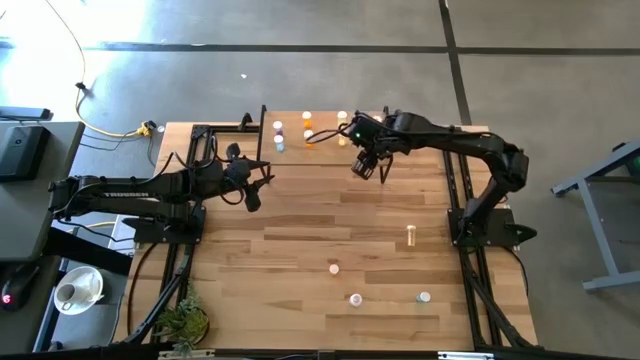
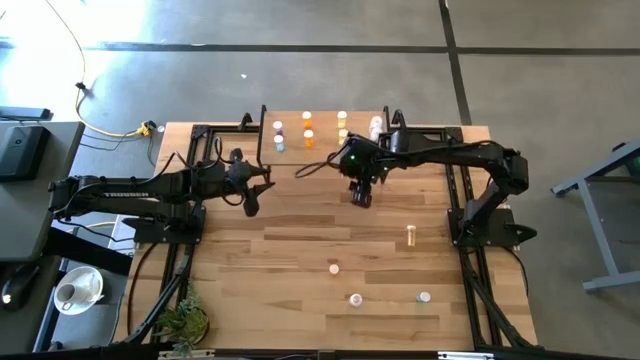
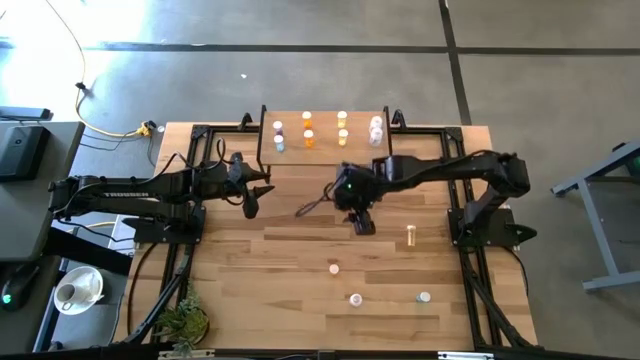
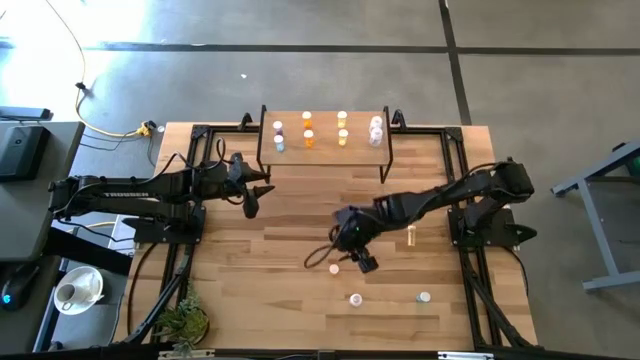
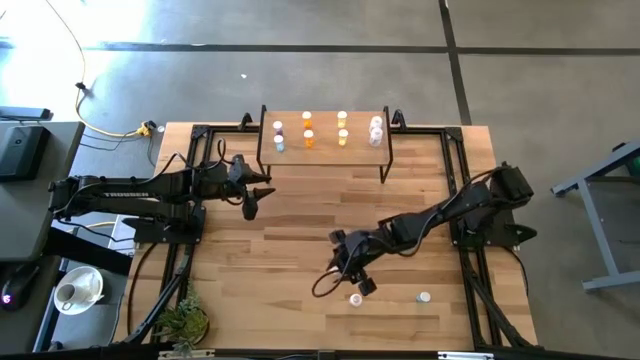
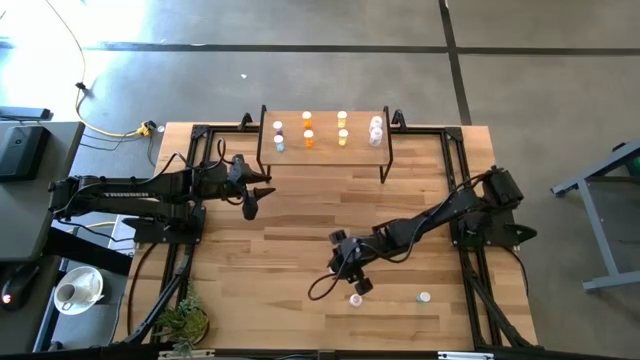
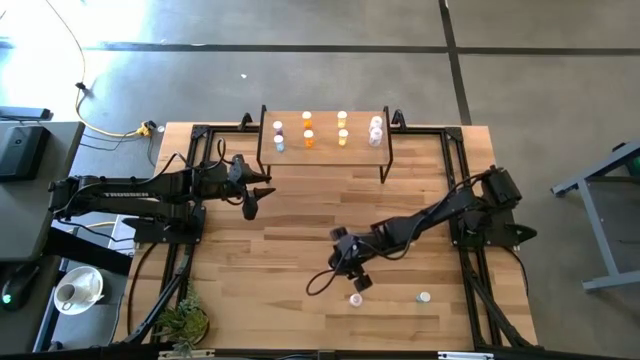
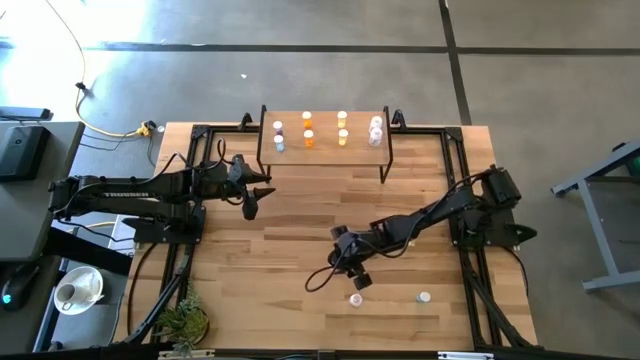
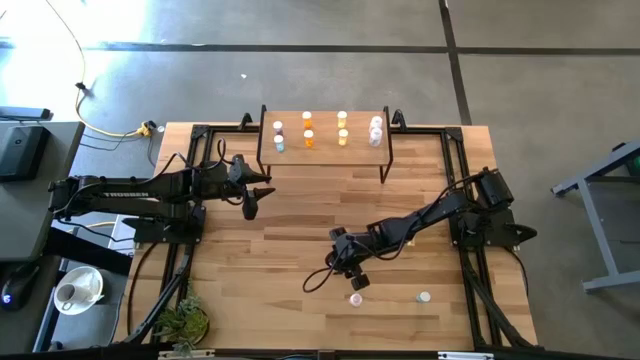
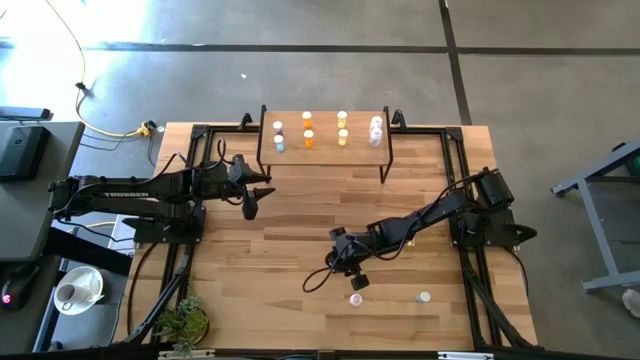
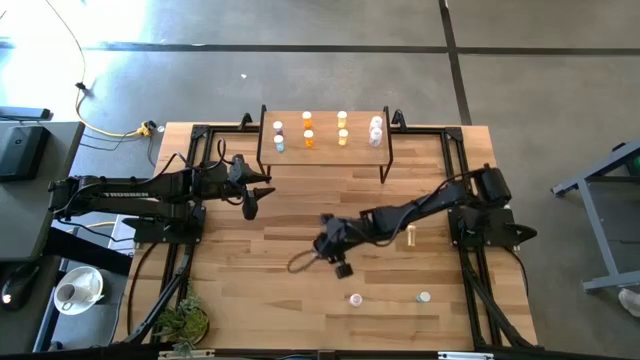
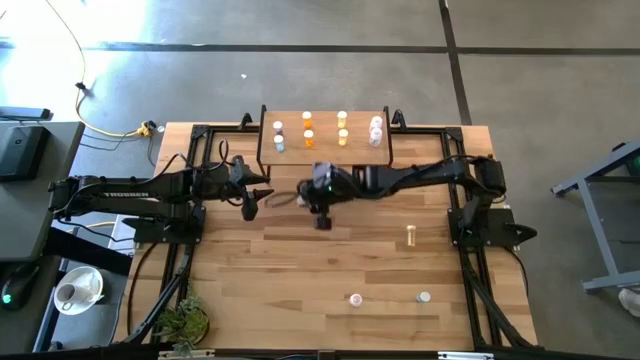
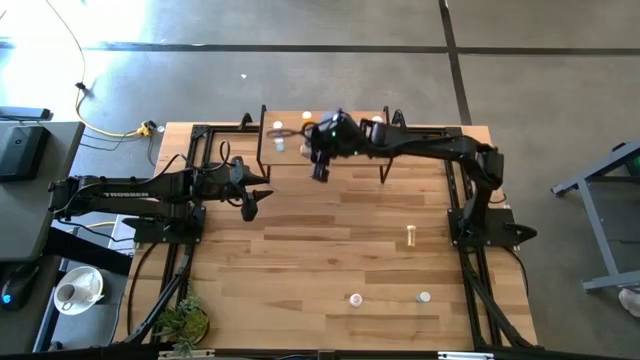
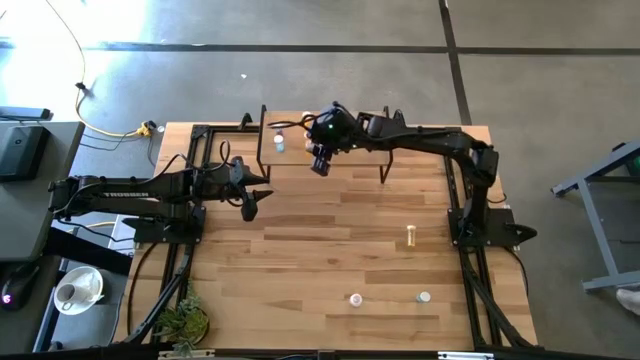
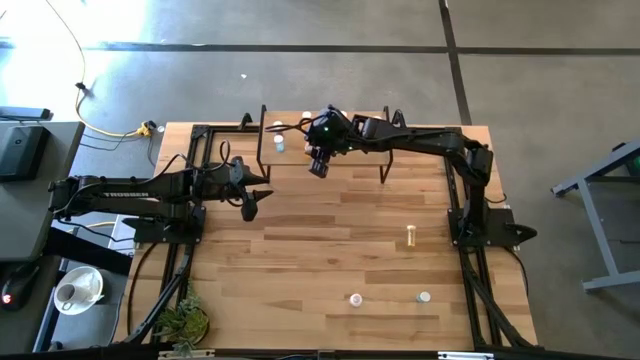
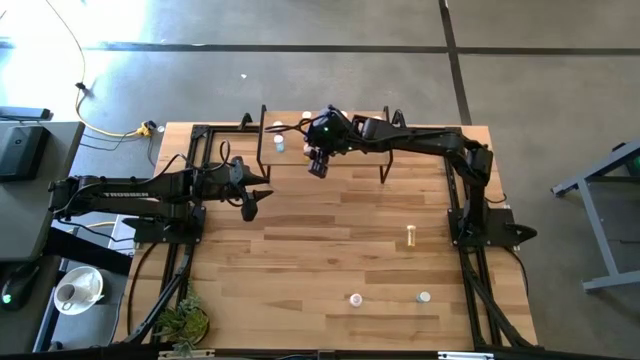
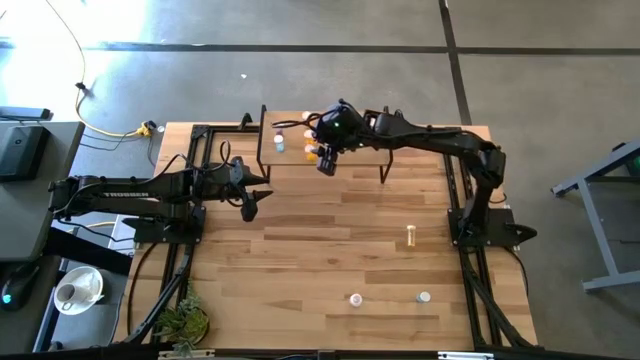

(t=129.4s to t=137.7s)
Task: Pick and place medicine bottles onto shelf by color
Put the orange pill bottle on the shelf aligned with the other orange pill bottle

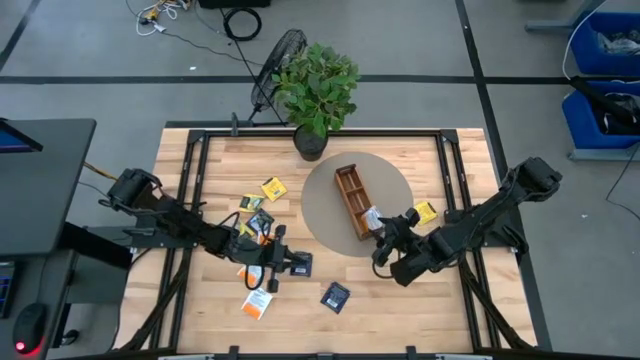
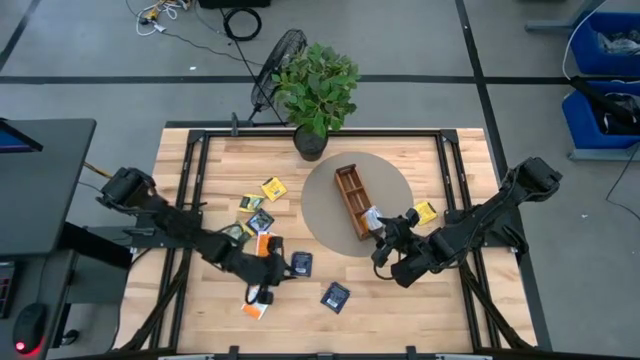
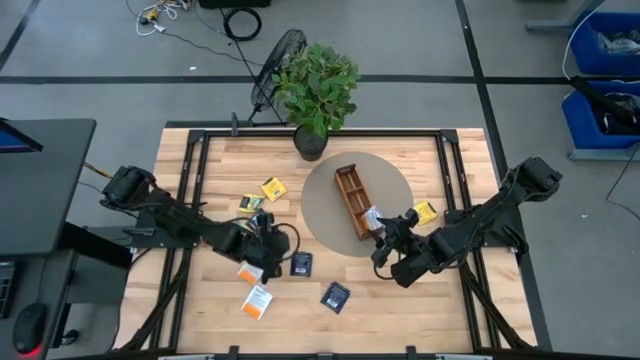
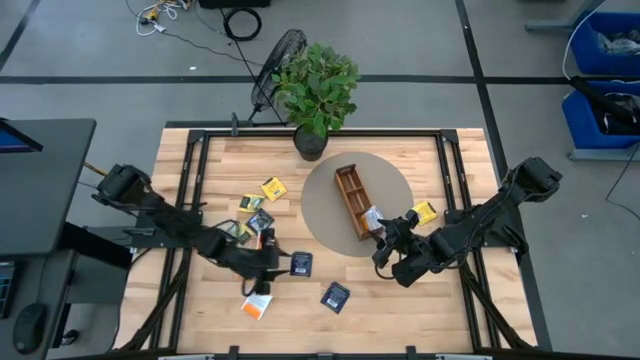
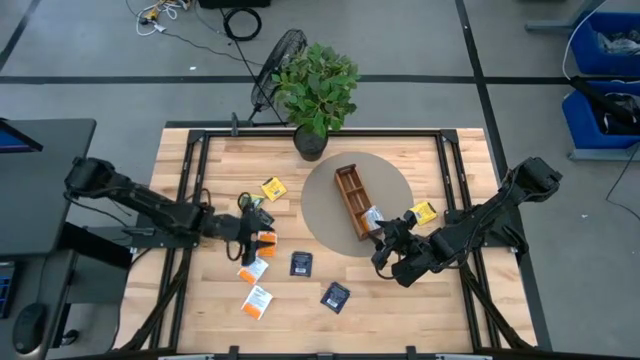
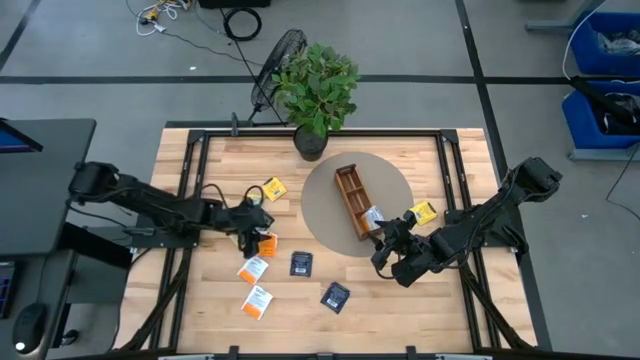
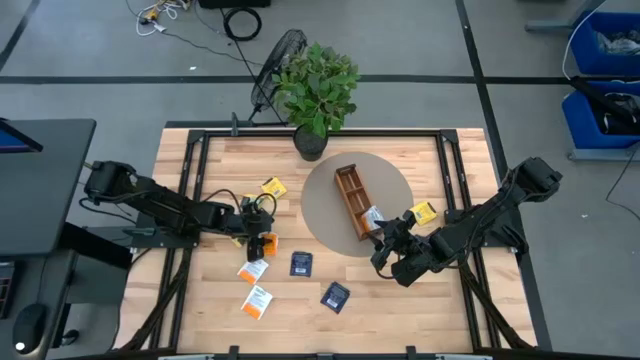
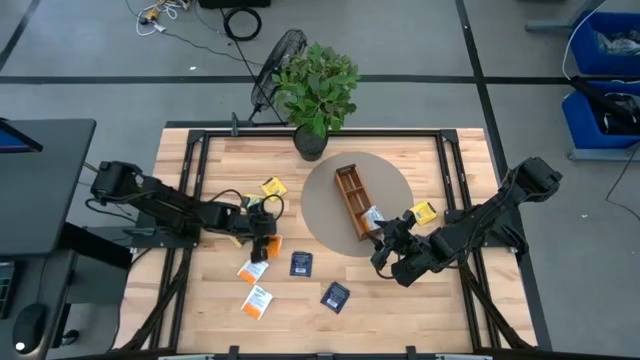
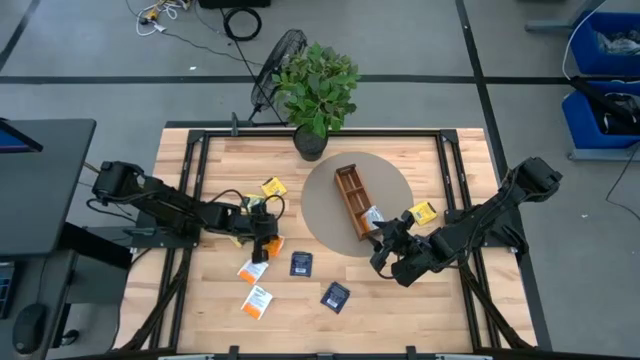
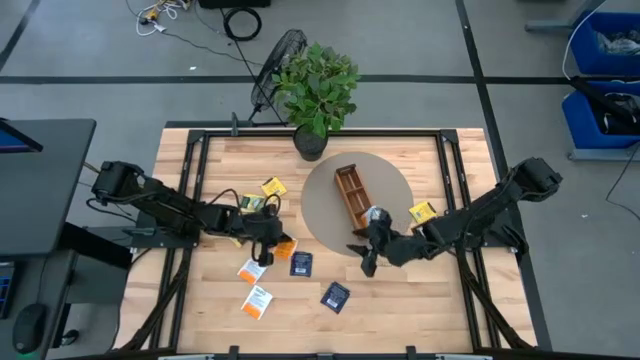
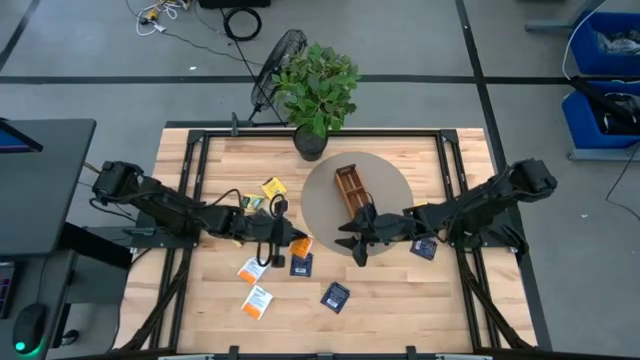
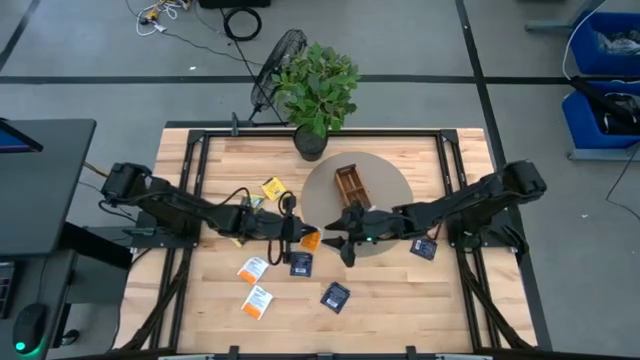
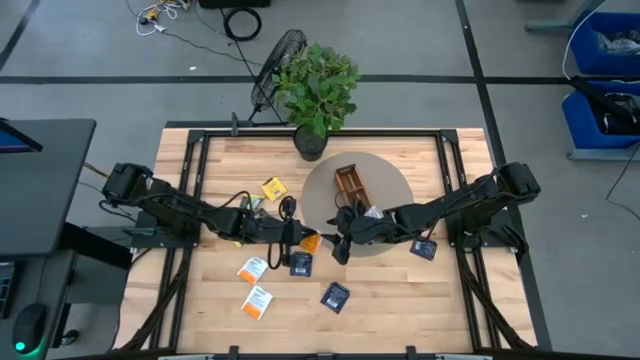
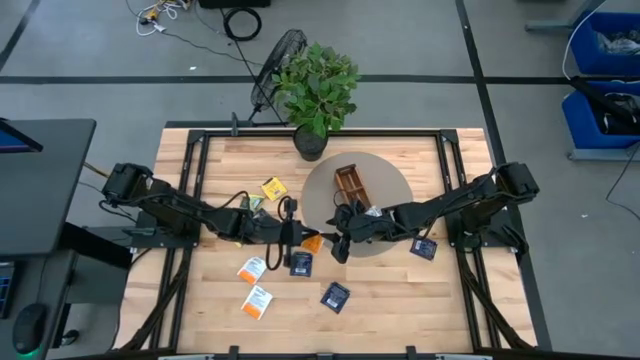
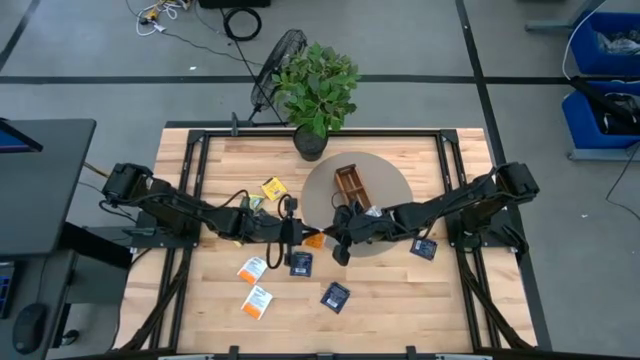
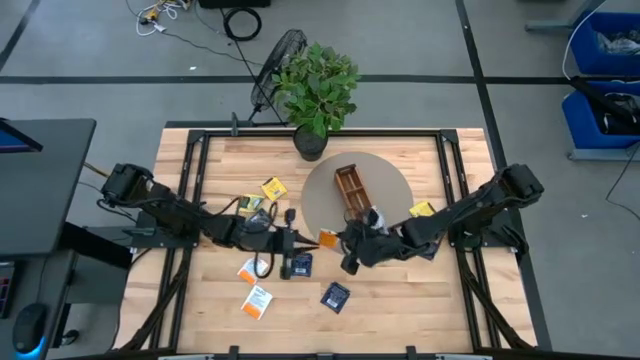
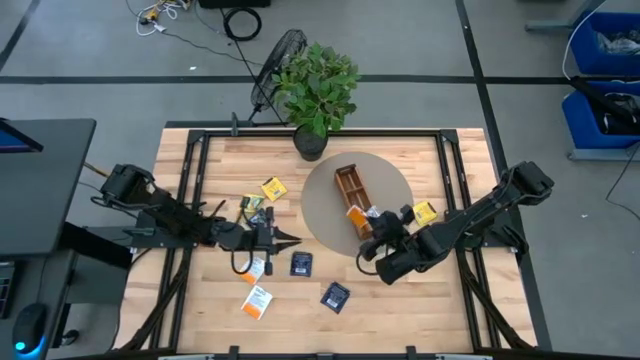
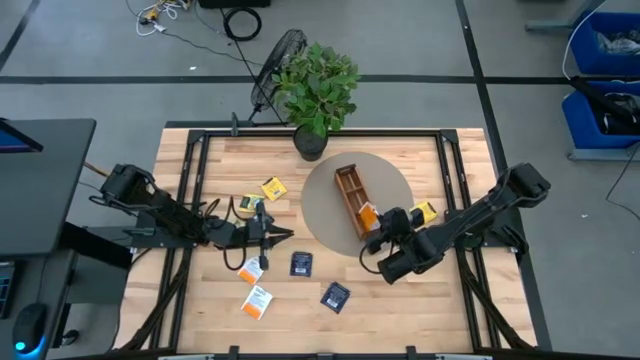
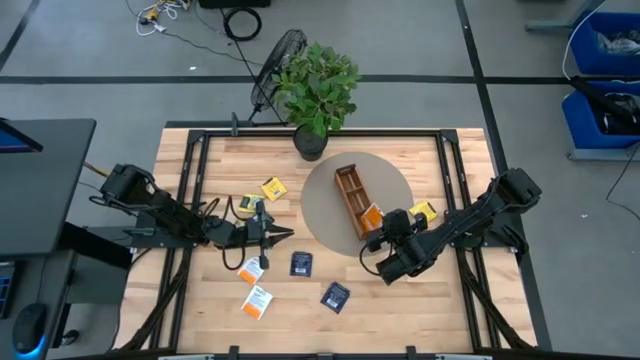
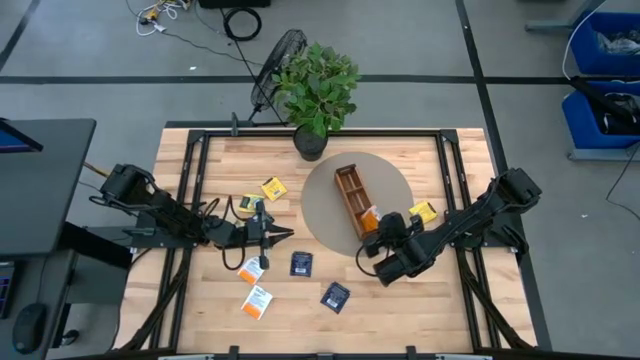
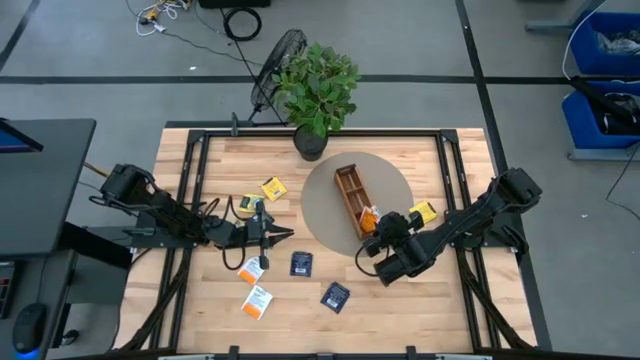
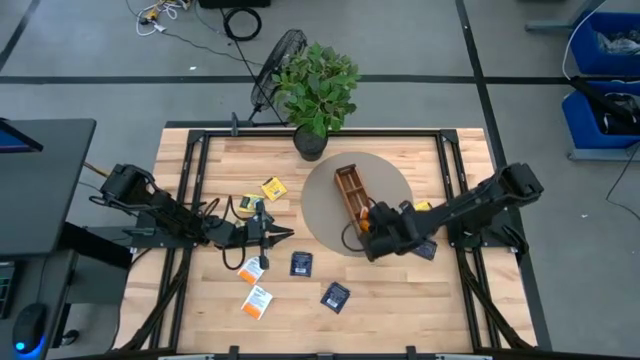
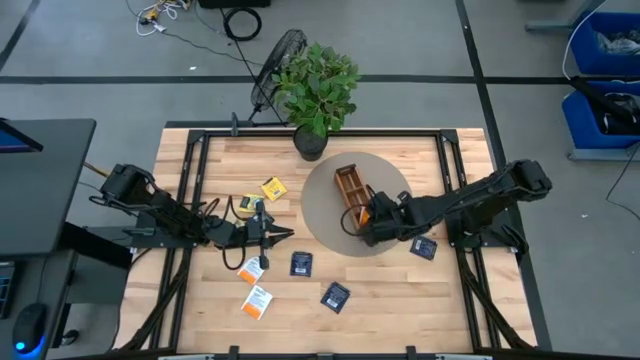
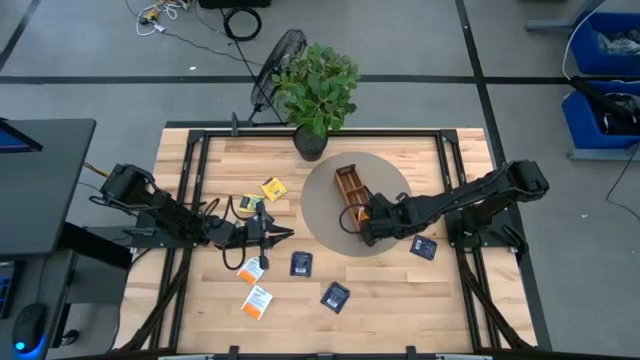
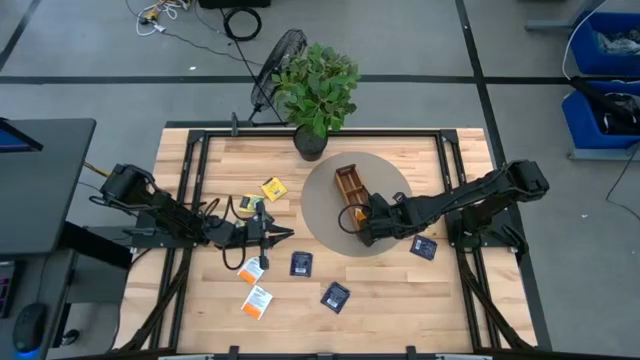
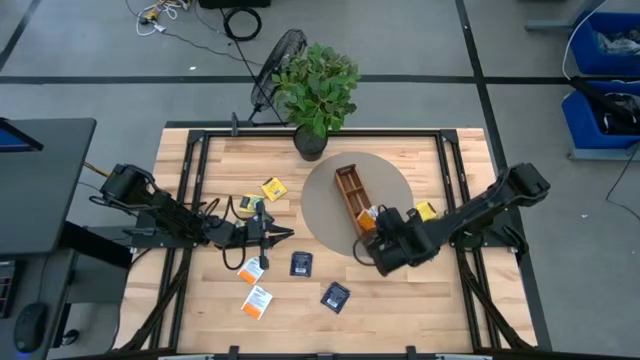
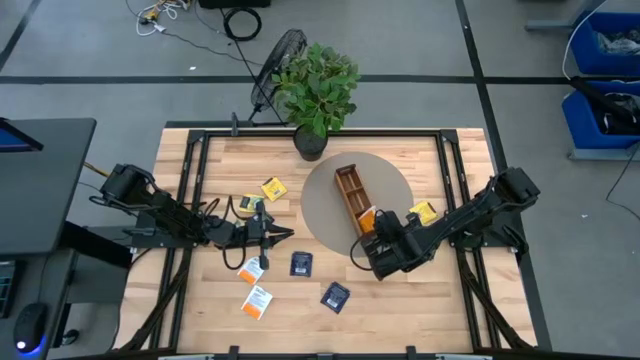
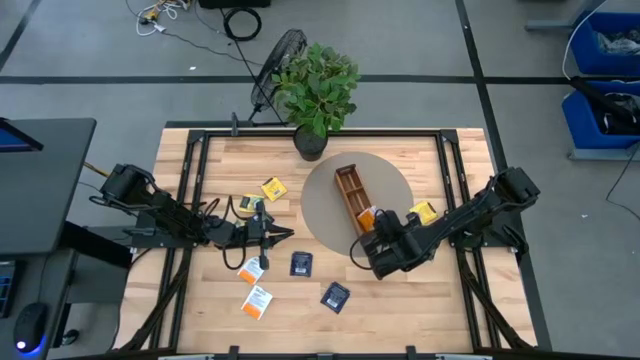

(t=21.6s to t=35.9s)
Task: Pick & Place Tea
Put the white tea bag into the bottom section of the wooden organizer
